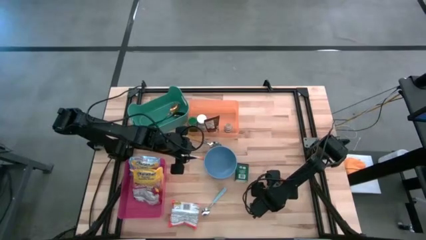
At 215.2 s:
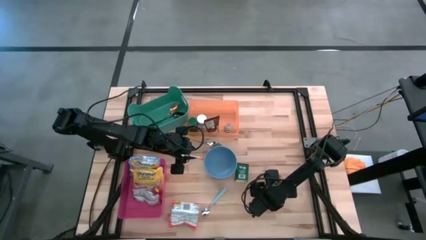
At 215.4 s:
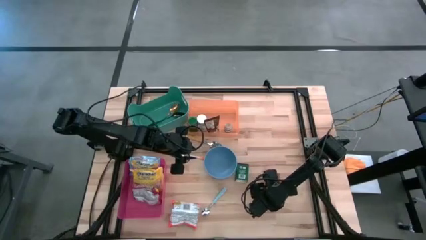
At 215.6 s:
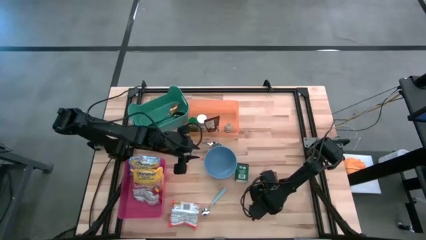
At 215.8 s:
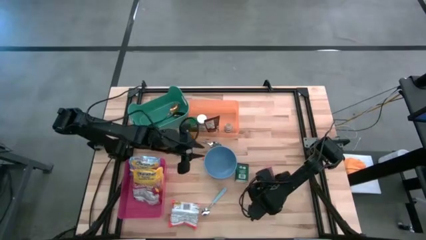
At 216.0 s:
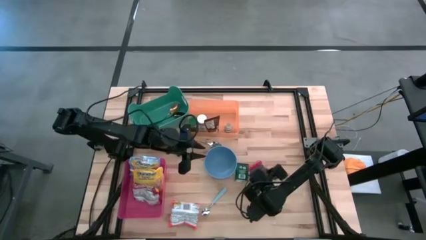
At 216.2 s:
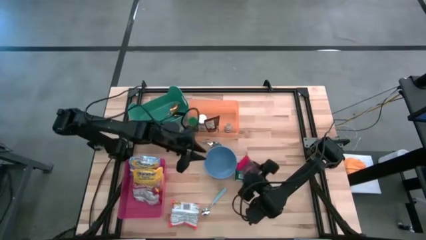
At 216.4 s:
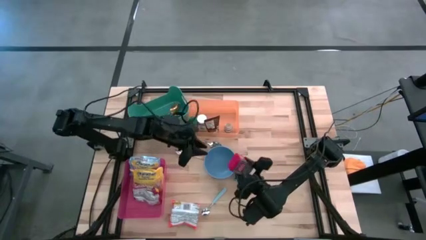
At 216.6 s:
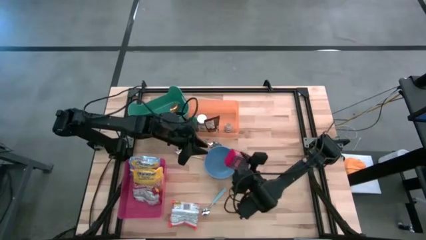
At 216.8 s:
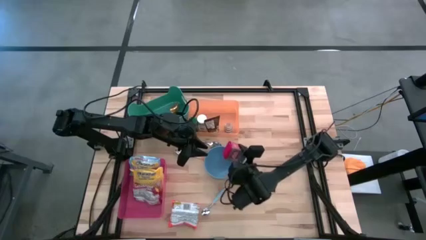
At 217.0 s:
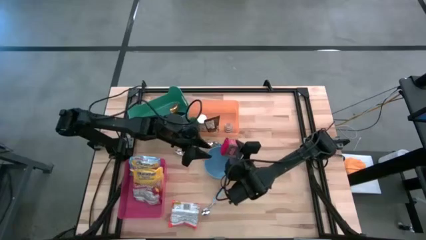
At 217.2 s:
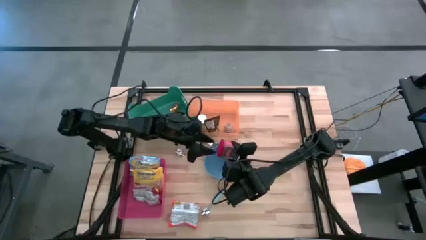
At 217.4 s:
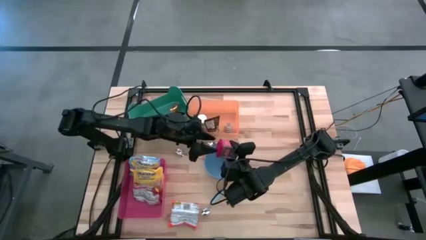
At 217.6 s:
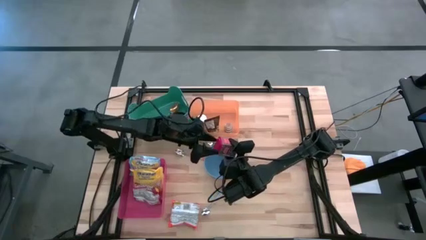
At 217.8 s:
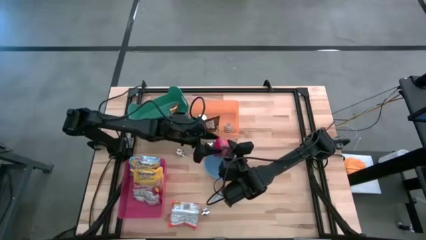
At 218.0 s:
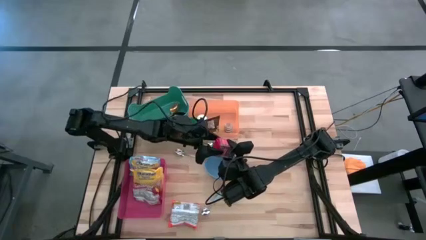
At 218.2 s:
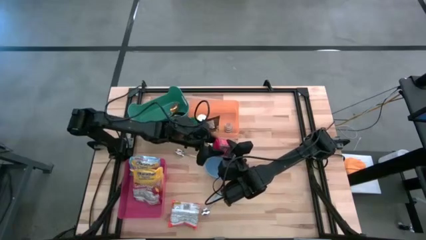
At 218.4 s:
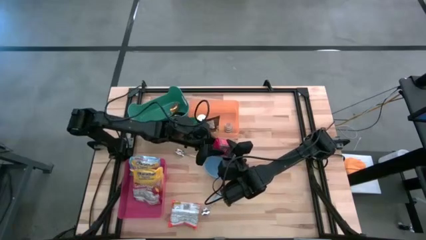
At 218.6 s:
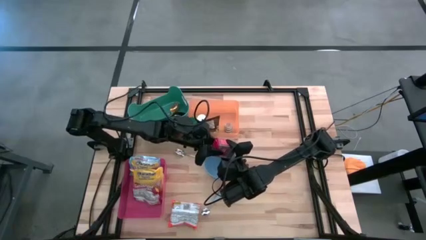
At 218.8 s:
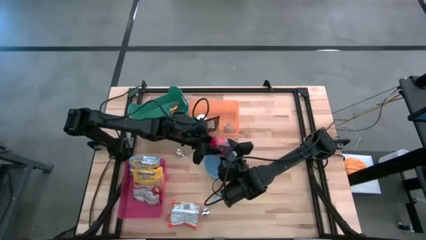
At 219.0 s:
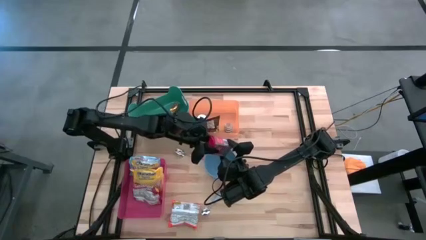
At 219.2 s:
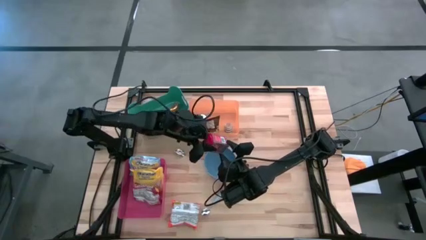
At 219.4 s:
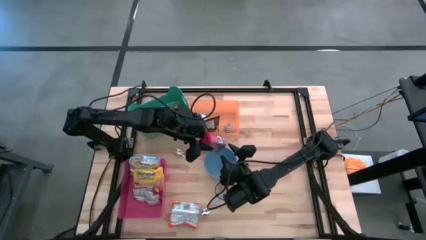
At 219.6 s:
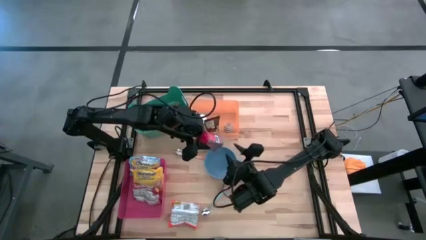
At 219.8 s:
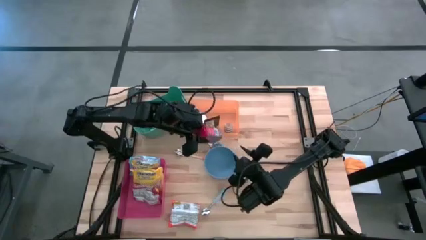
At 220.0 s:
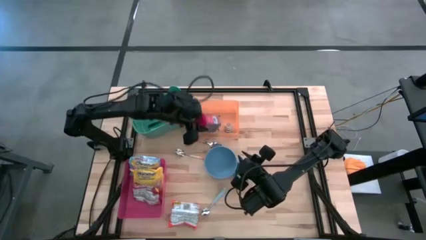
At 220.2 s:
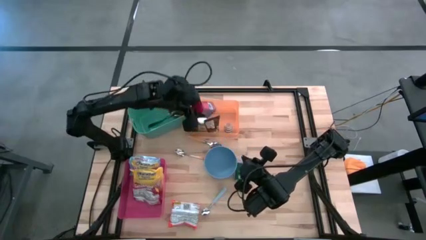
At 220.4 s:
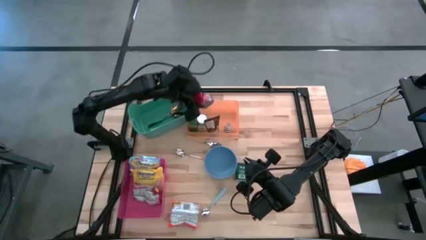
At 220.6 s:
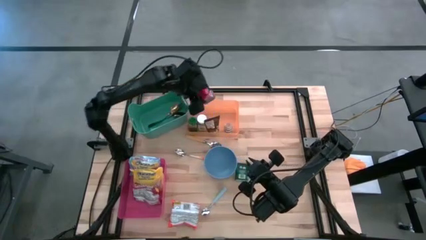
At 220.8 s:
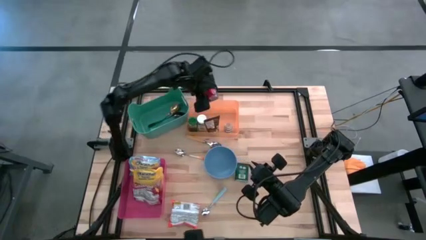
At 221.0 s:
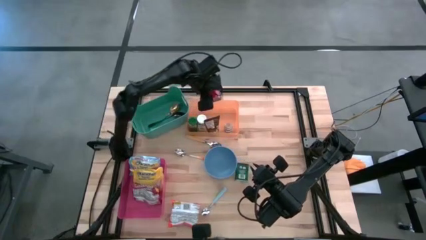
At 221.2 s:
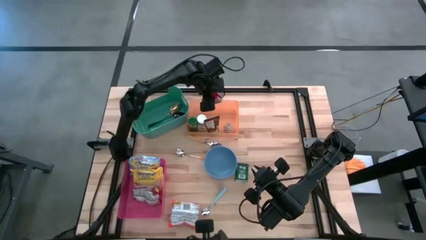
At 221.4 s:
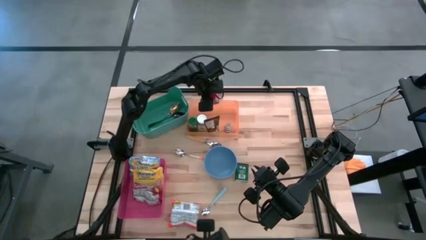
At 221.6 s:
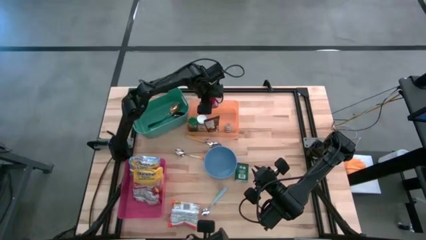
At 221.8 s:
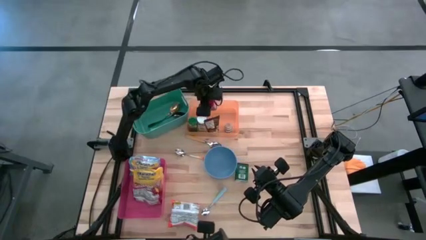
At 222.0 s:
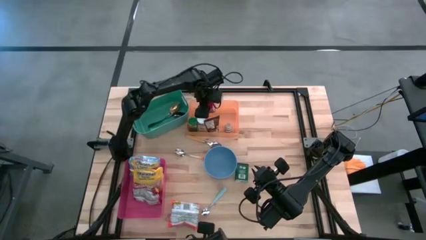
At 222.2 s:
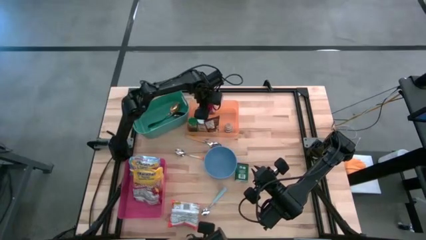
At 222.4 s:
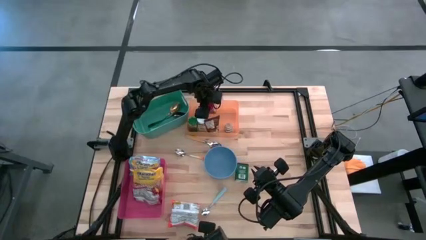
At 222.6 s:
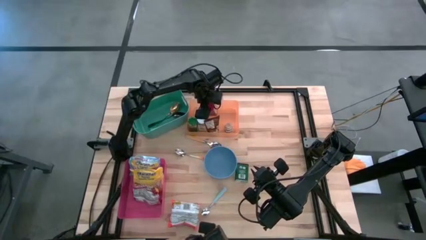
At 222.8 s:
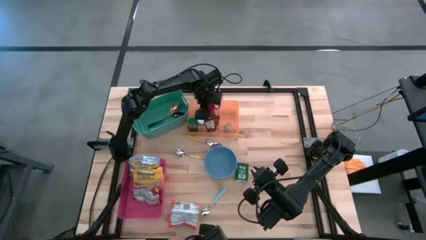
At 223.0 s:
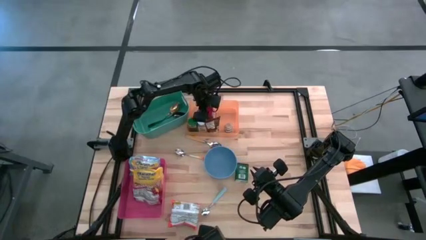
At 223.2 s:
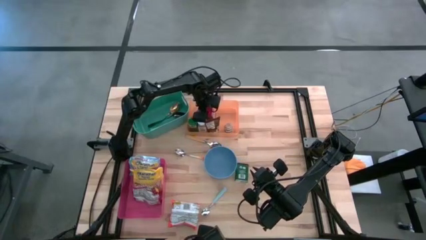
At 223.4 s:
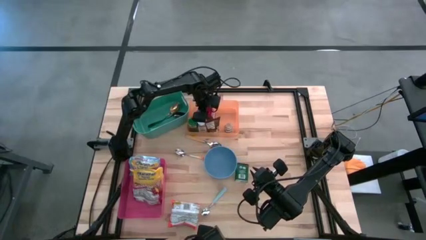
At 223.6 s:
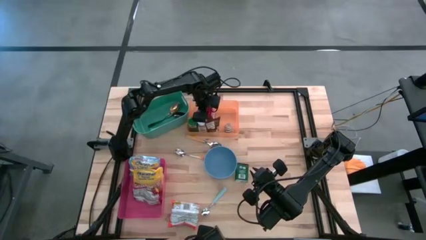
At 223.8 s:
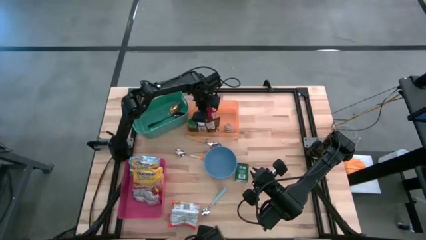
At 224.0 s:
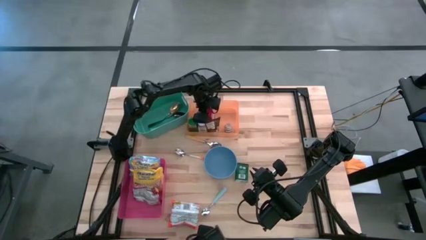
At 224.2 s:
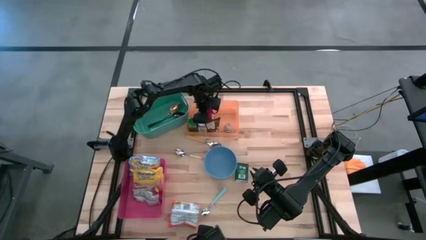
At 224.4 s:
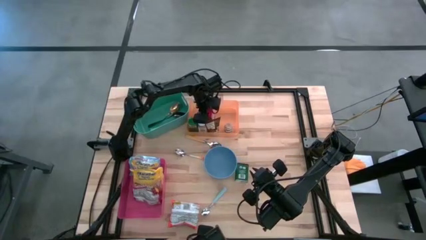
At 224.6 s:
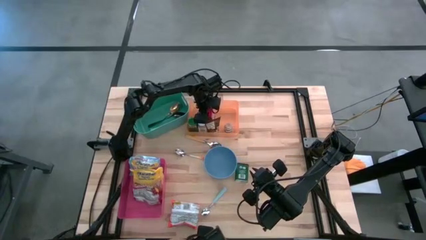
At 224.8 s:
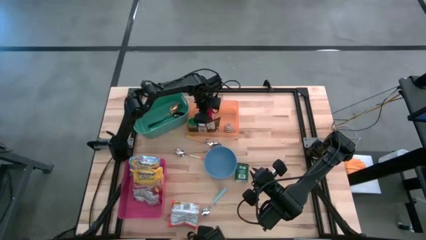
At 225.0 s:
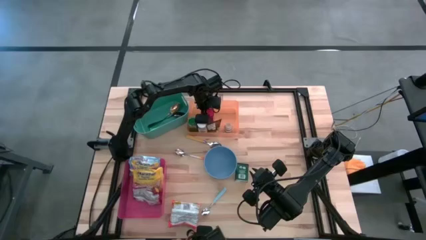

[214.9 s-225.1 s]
Put the red spice can into the orange bin

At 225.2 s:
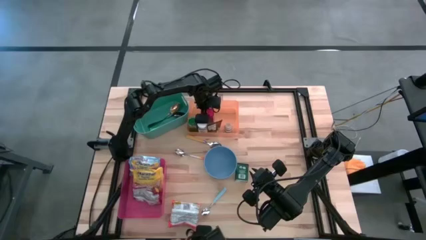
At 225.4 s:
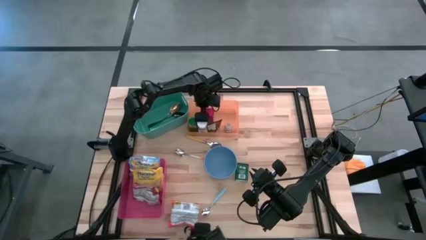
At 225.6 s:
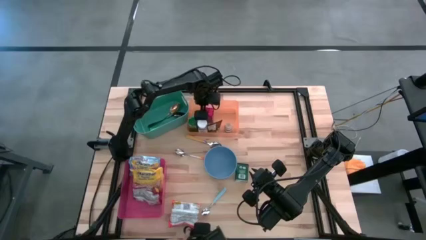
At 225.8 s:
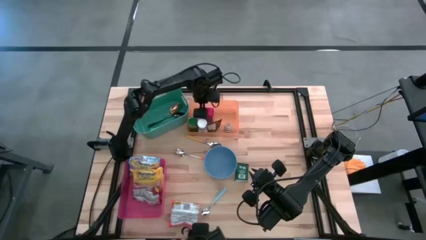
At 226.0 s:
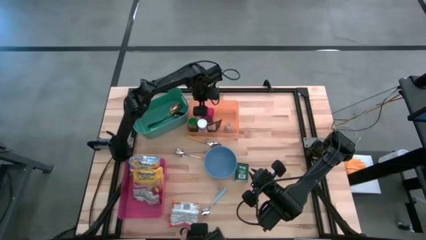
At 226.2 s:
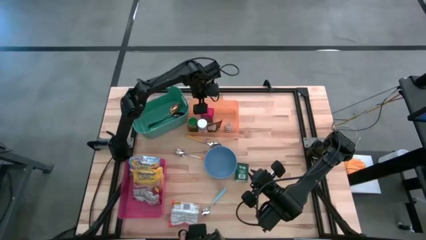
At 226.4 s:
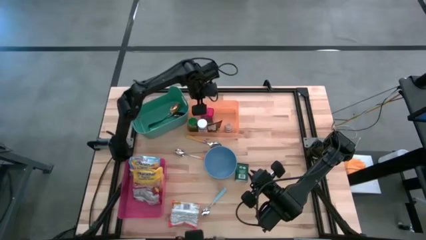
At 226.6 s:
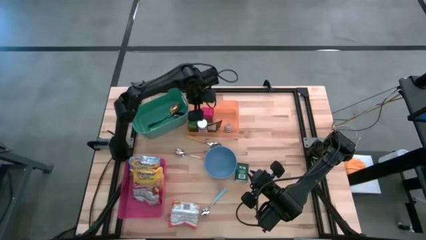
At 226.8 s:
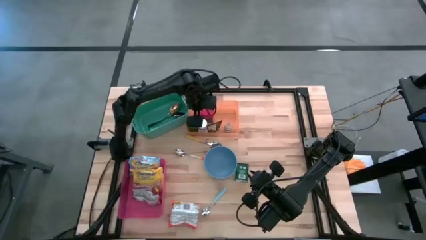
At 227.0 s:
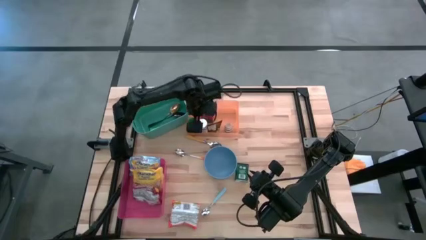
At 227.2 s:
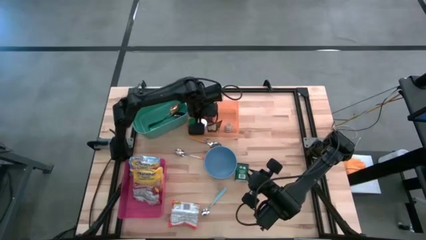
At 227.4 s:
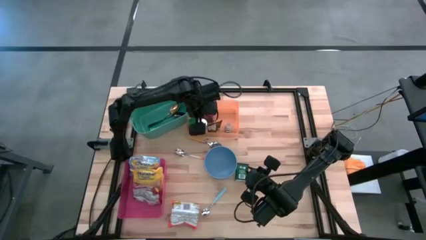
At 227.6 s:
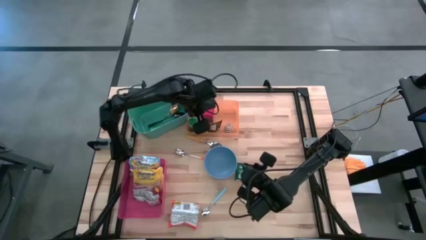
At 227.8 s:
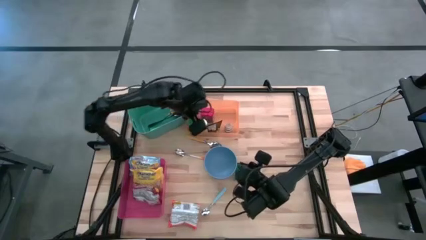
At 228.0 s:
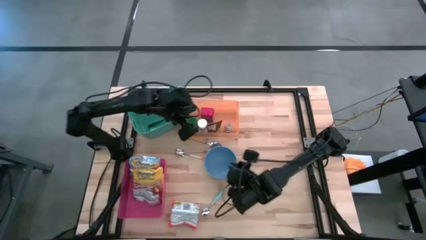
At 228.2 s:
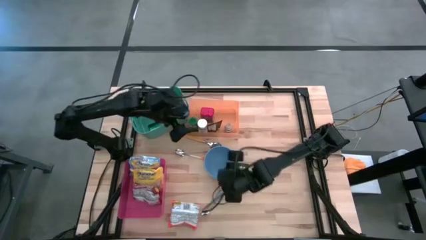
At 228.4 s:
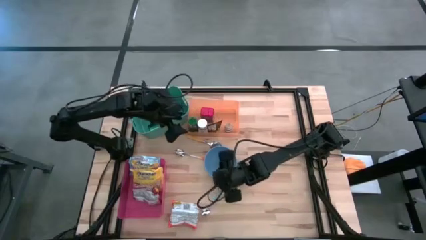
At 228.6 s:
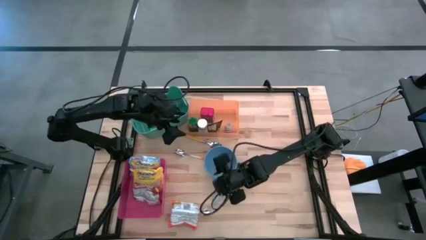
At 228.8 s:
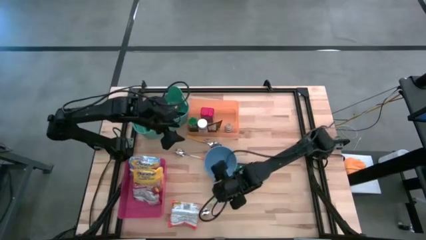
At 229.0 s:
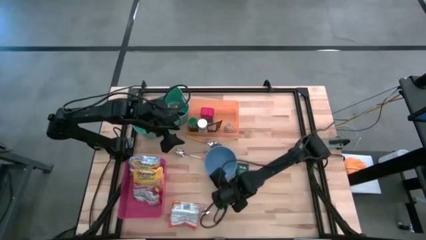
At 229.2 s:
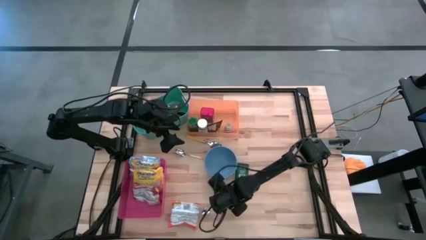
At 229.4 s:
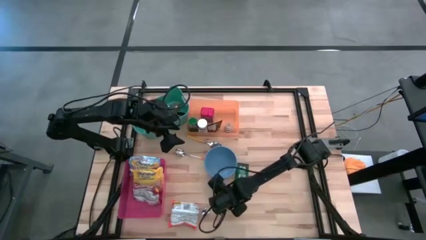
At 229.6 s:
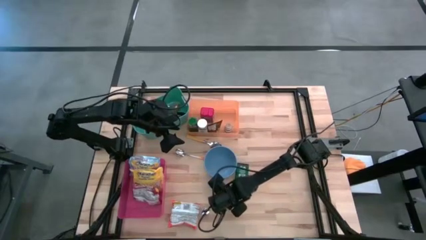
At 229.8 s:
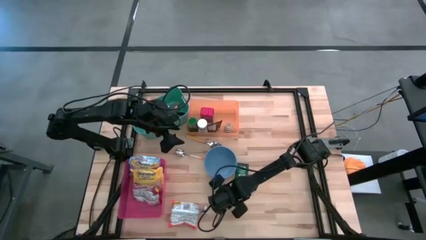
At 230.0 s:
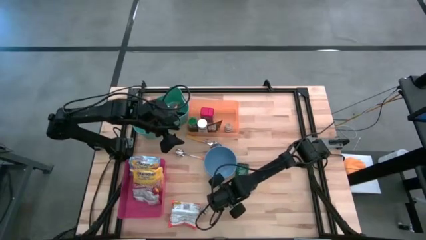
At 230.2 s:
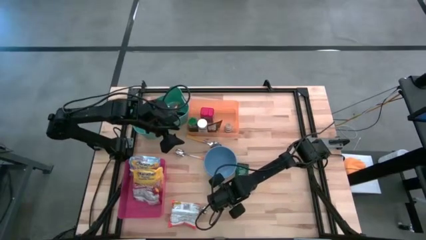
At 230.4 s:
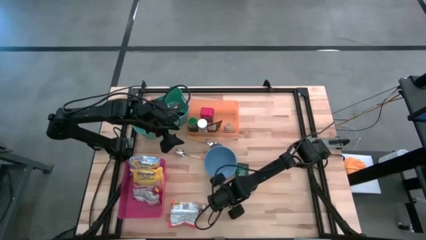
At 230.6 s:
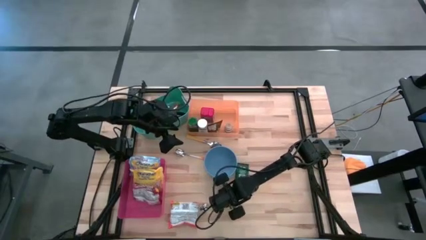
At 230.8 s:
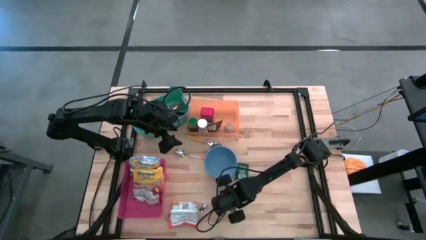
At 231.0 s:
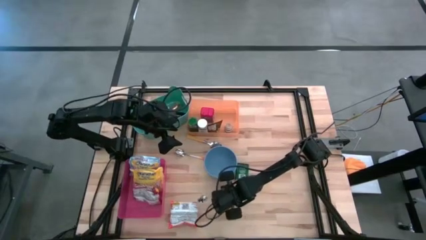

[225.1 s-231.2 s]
Put the blue spoon into the green bin
